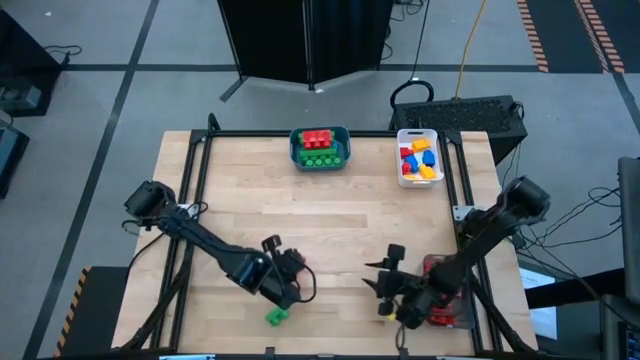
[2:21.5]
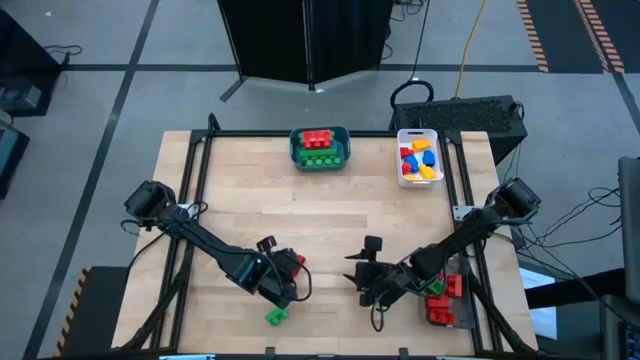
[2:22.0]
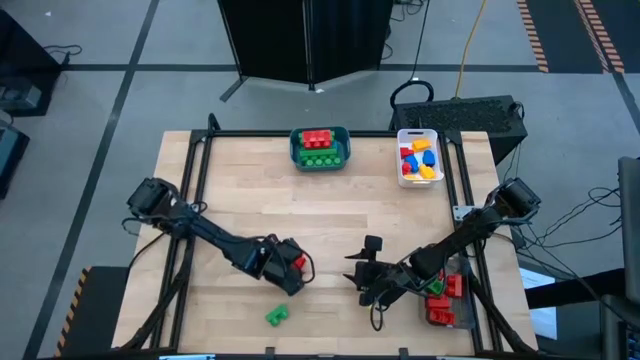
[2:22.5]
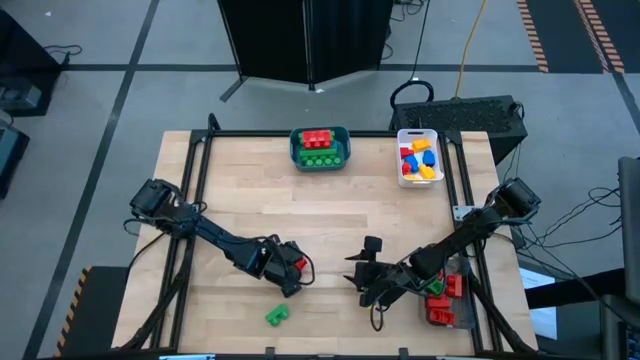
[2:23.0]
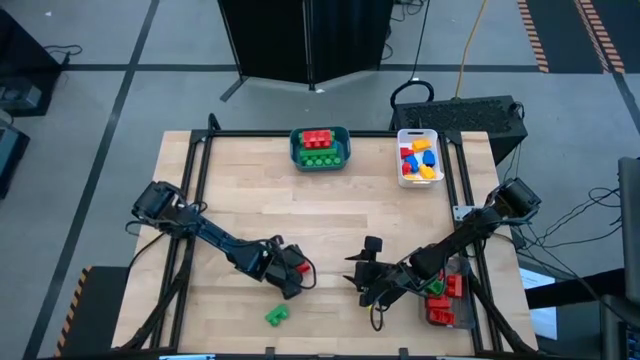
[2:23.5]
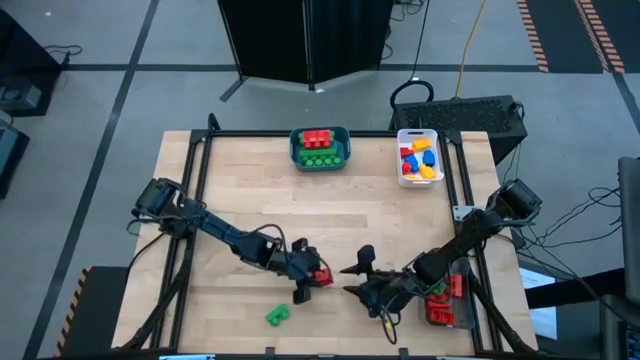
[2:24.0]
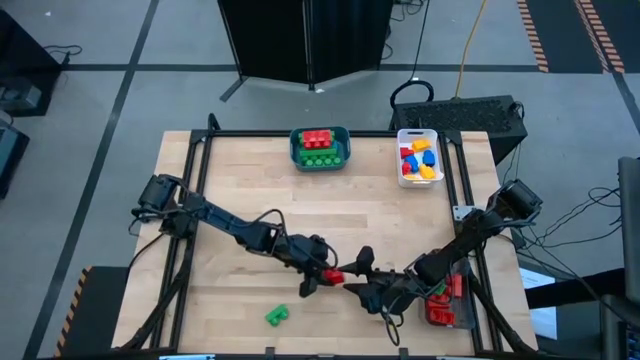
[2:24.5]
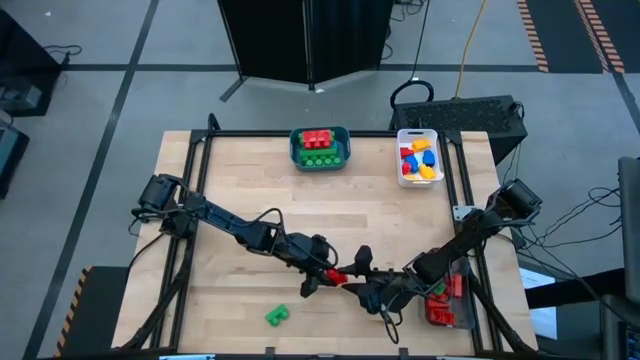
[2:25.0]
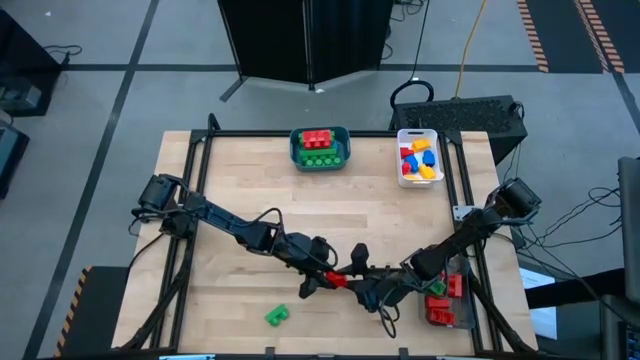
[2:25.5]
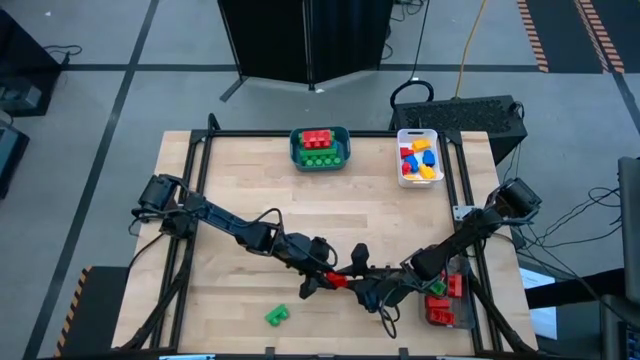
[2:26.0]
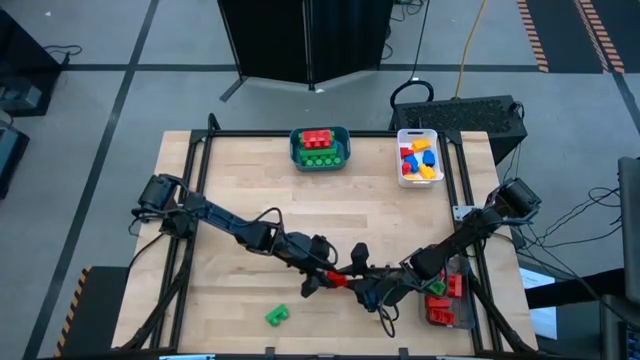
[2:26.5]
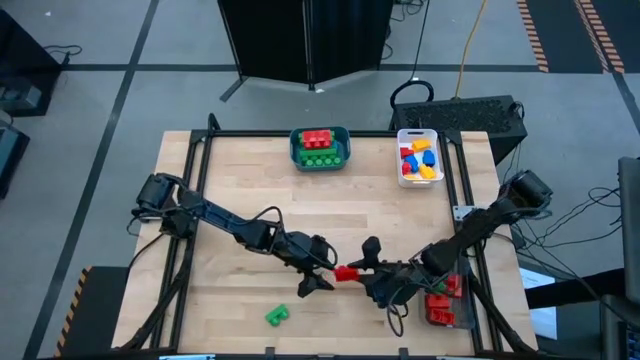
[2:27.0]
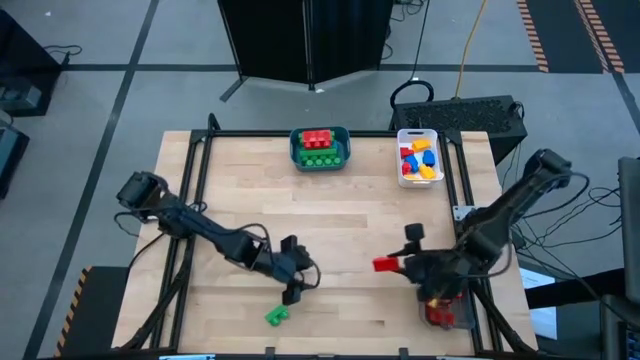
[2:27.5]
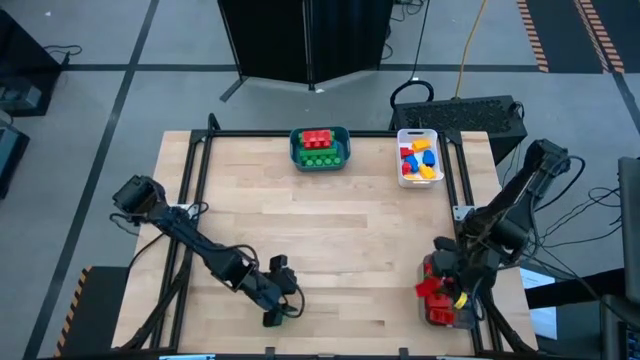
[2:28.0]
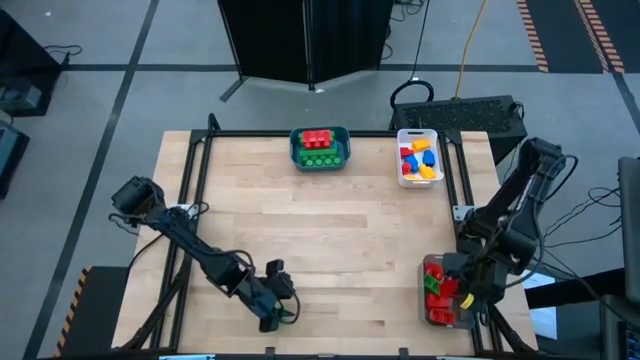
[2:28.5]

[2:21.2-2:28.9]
Task: Sort blocks by size
Put the two stud red game piece into the black transparent bin

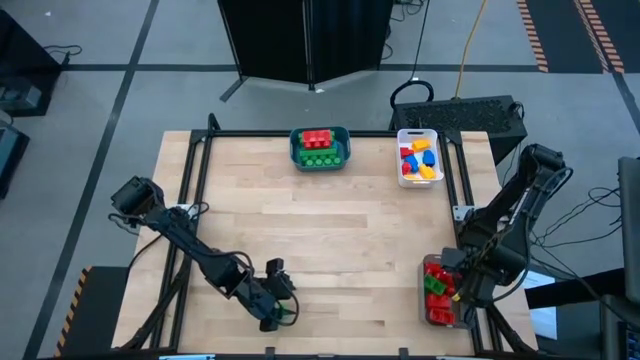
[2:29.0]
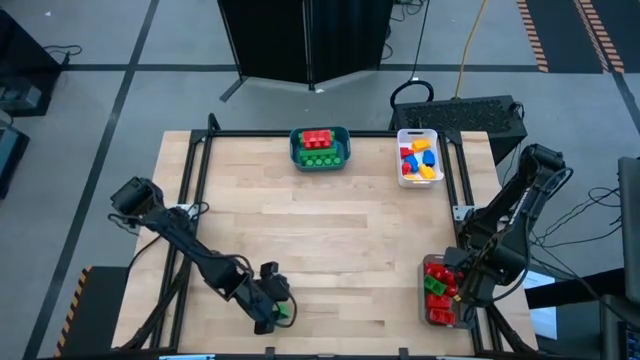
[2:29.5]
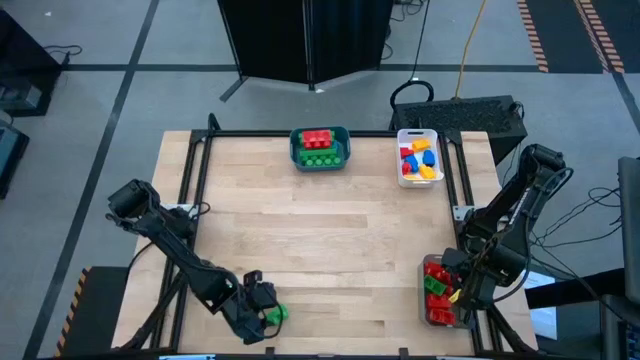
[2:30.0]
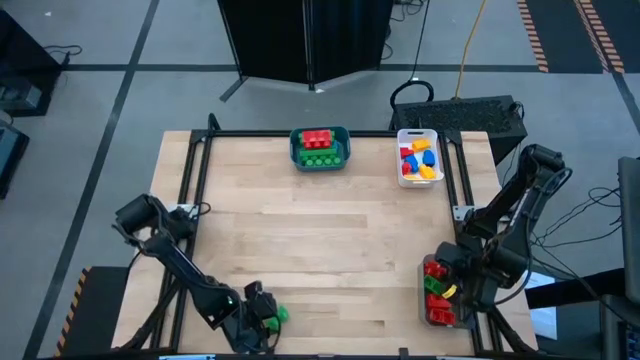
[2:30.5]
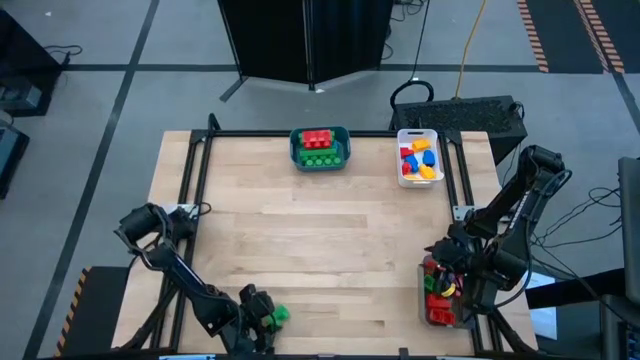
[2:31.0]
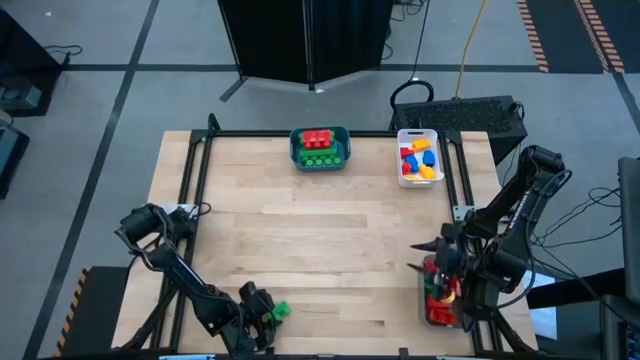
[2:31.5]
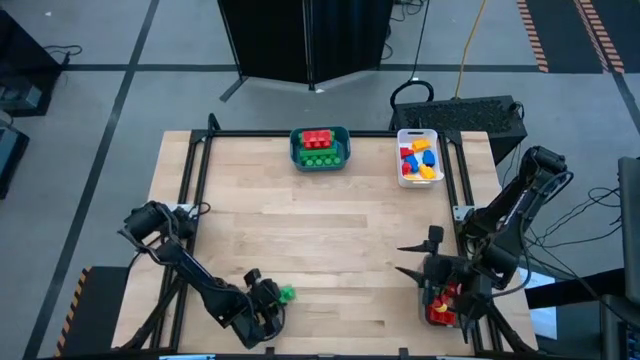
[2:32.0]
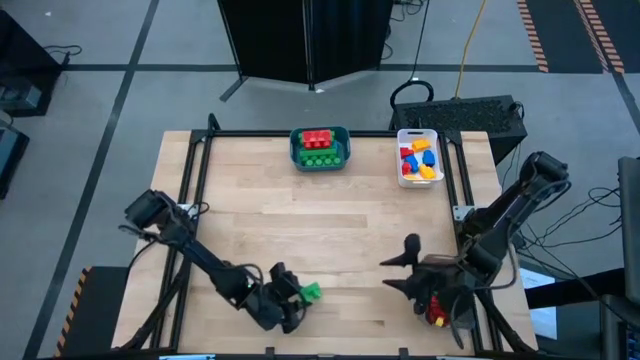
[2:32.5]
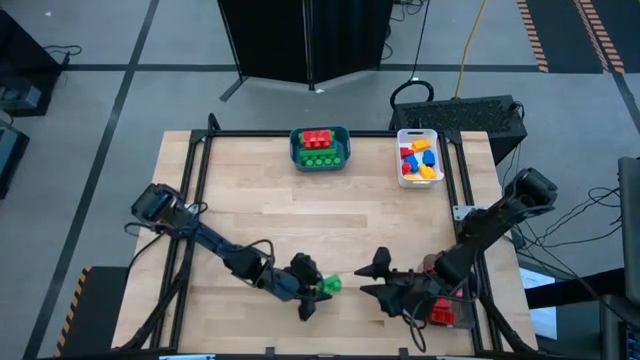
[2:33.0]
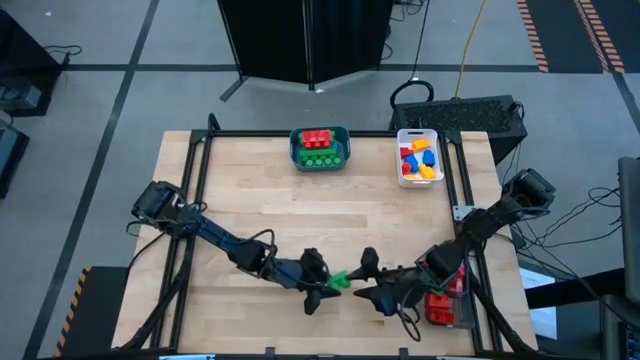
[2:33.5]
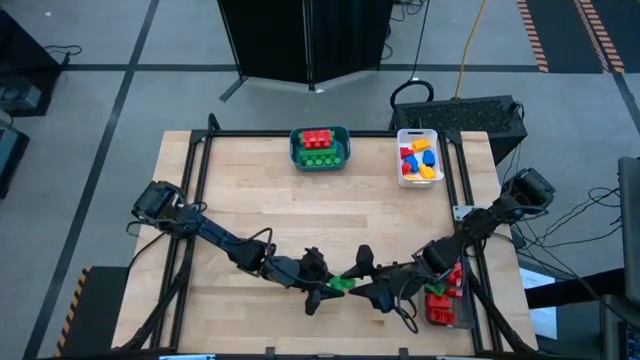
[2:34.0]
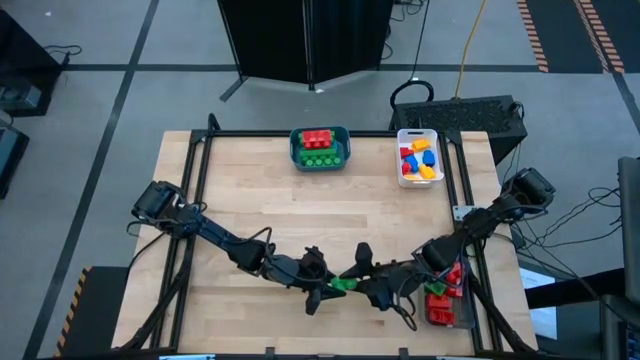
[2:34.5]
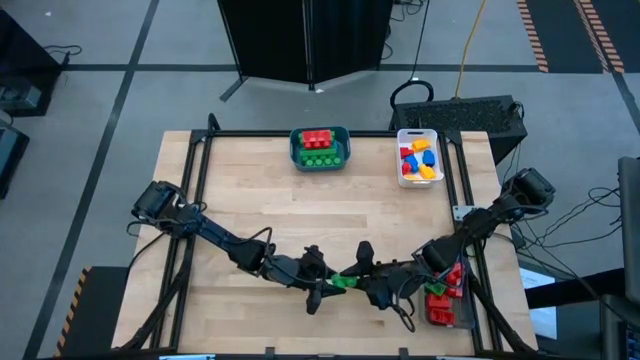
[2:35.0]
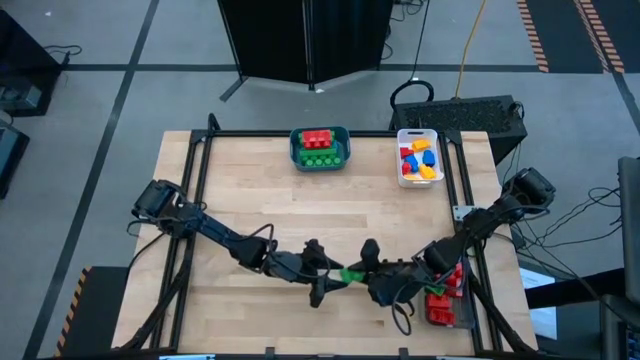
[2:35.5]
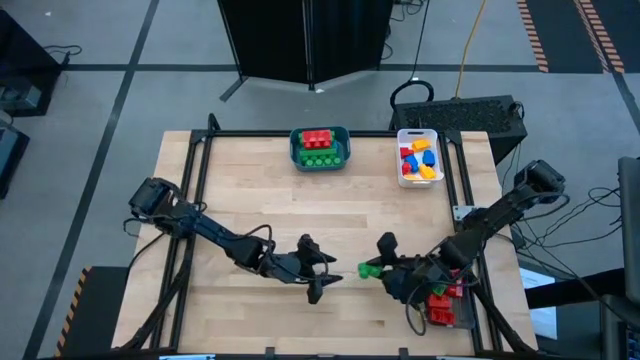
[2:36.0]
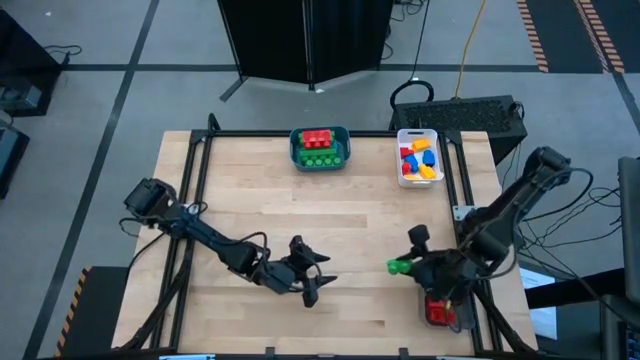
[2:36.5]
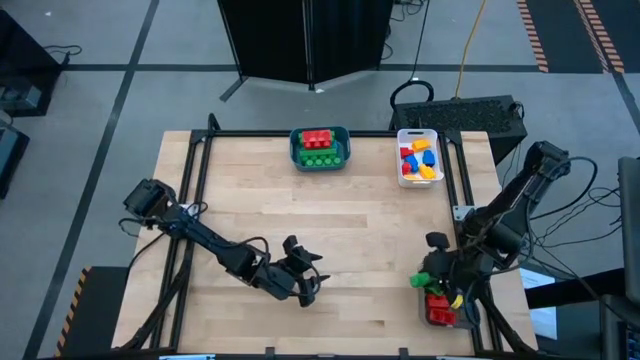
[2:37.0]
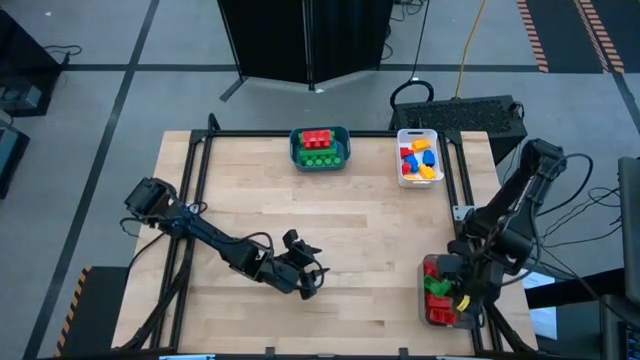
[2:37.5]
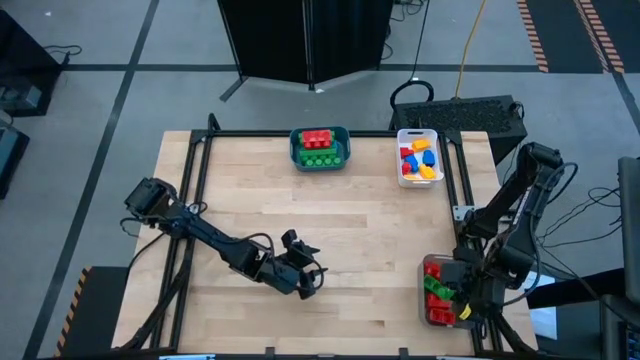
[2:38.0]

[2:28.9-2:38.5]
Put the two stud green game piece into the black transparent bin

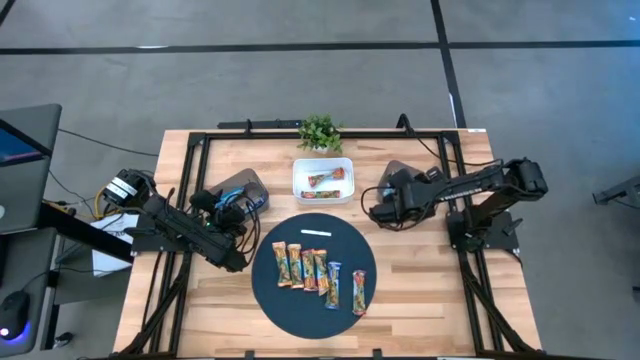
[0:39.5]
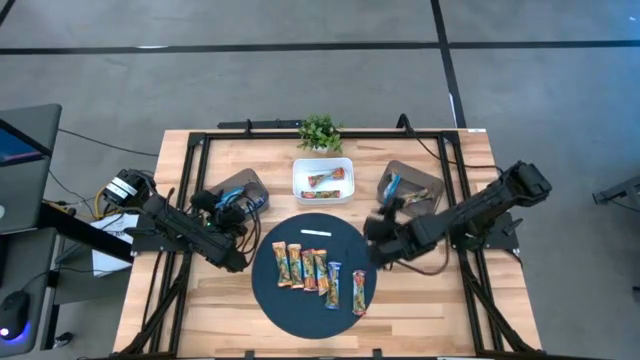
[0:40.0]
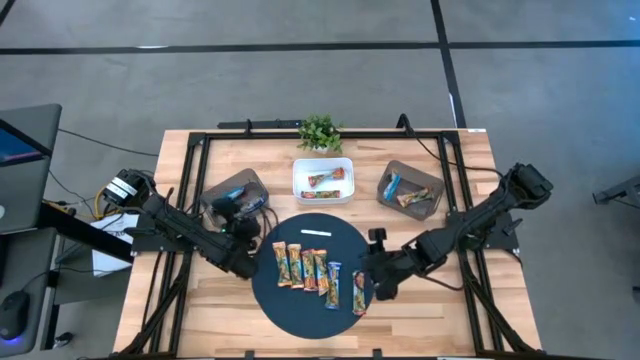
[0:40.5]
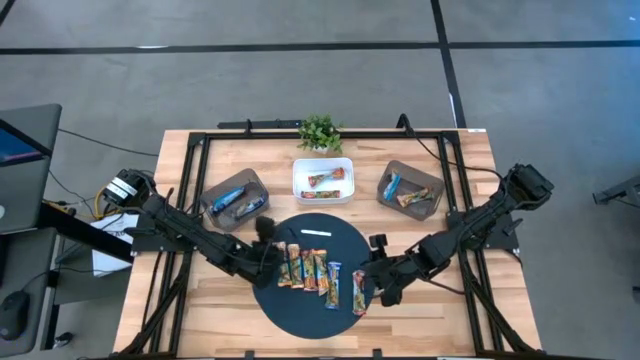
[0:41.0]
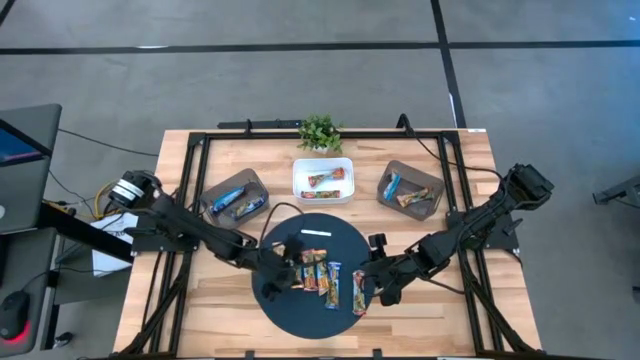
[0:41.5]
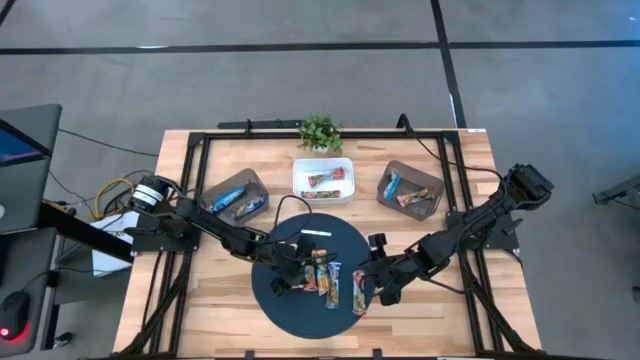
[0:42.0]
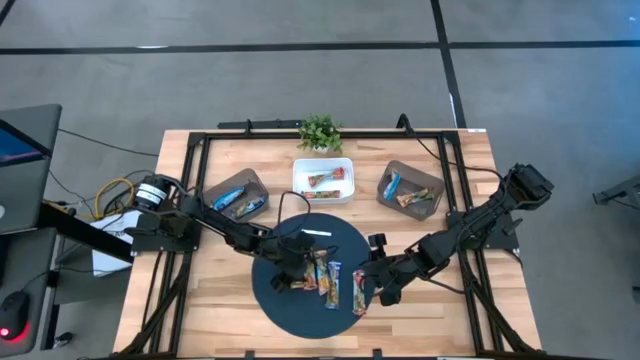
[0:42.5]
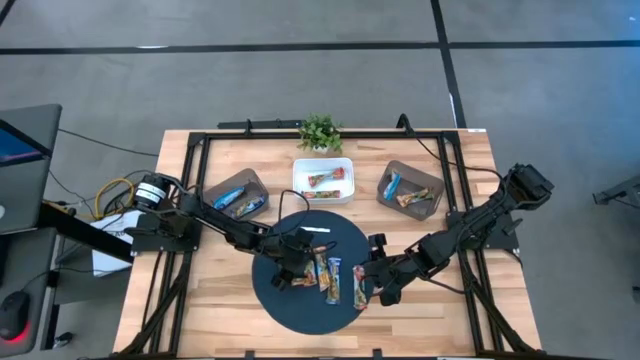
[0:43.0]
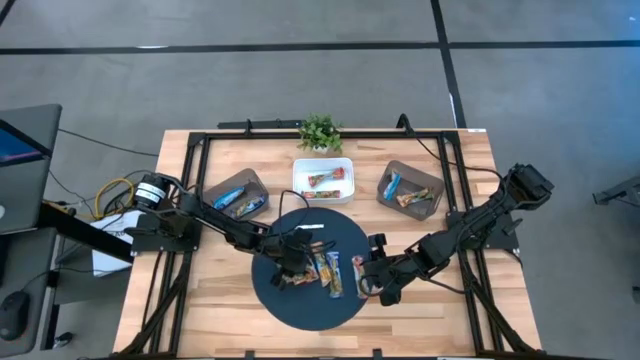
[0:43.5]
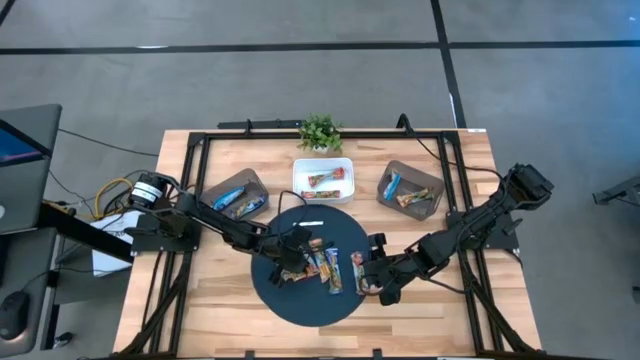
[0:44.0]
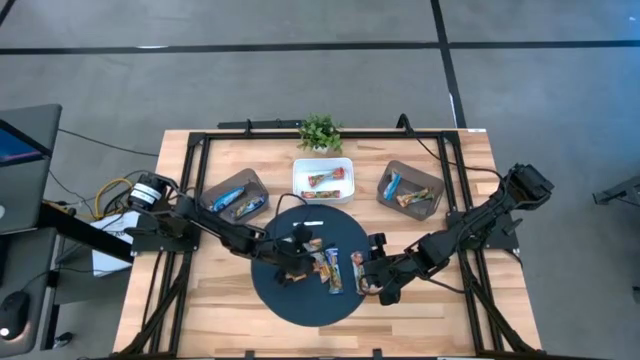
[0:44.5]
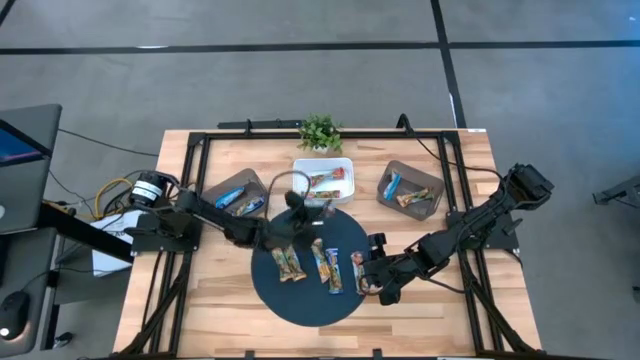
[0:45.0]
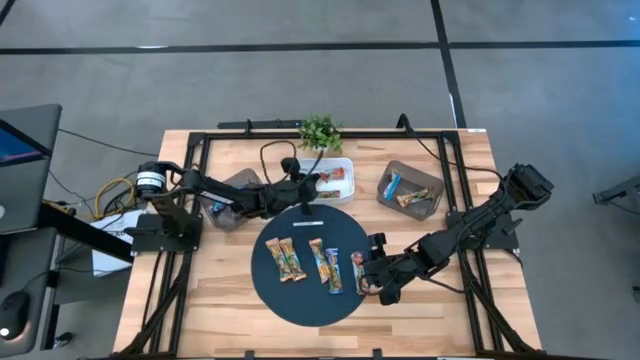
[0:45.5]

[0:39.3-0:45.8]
Task: Pick and place Granola Bars by type
Put the red granola bar into the white bin
